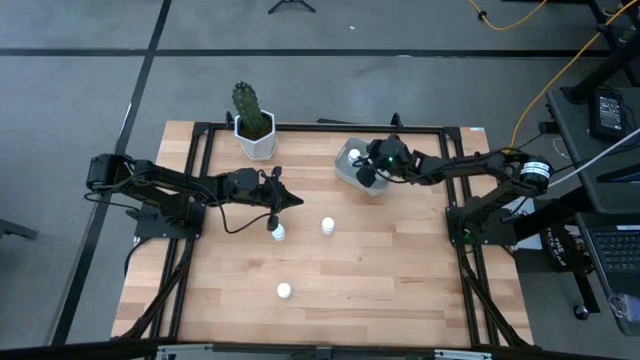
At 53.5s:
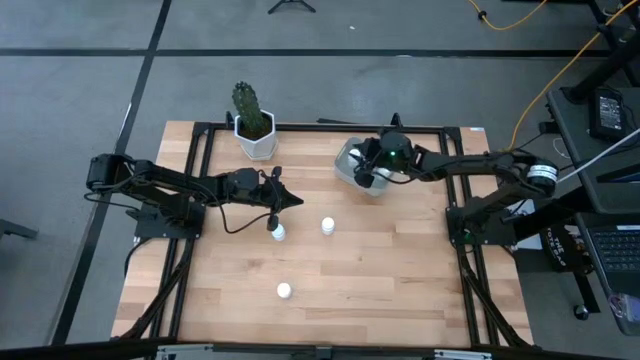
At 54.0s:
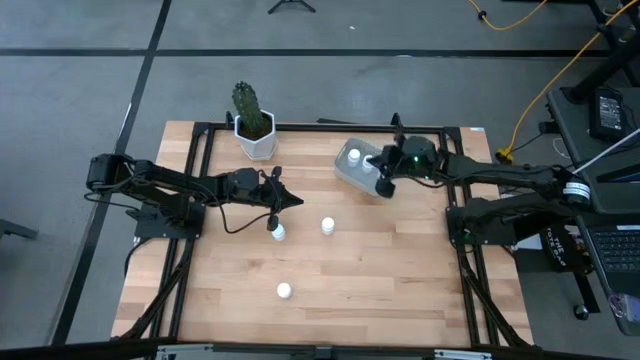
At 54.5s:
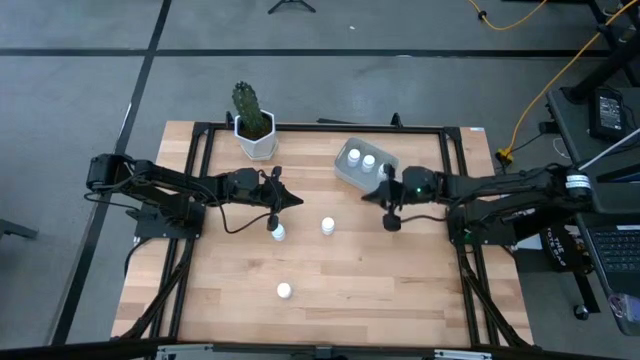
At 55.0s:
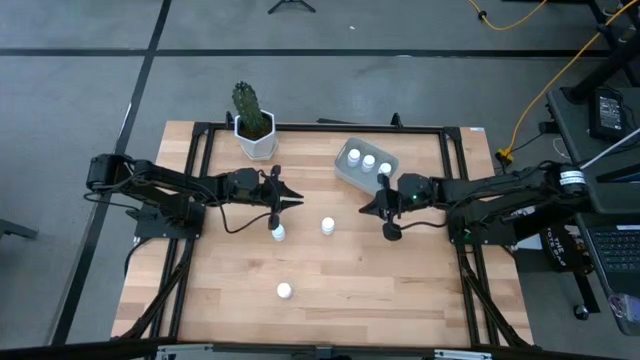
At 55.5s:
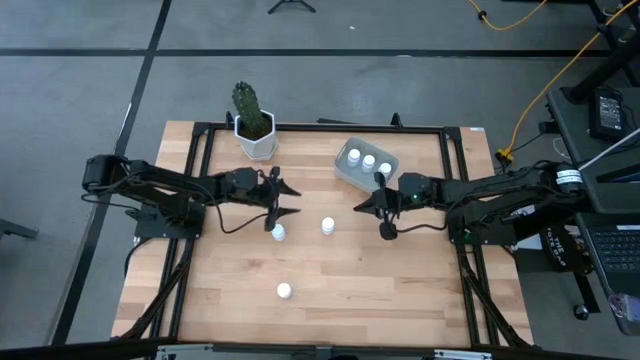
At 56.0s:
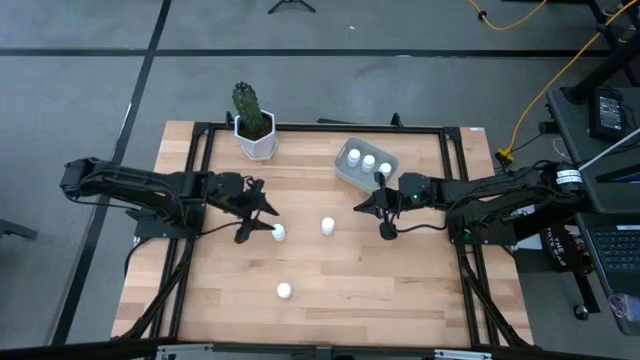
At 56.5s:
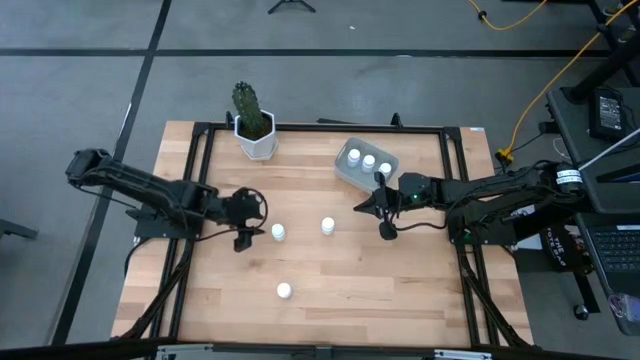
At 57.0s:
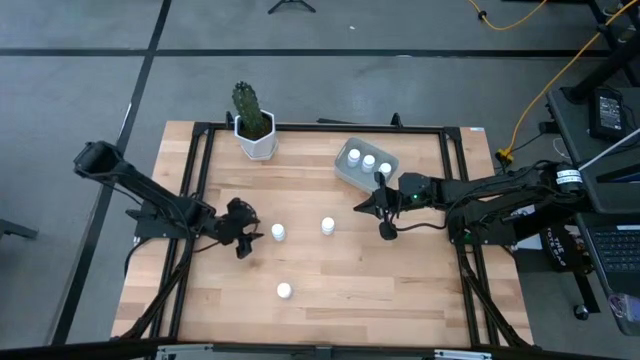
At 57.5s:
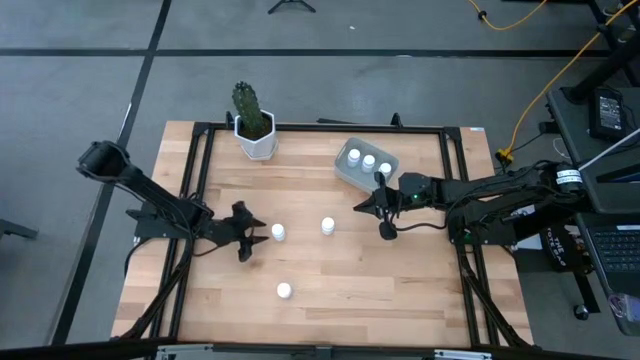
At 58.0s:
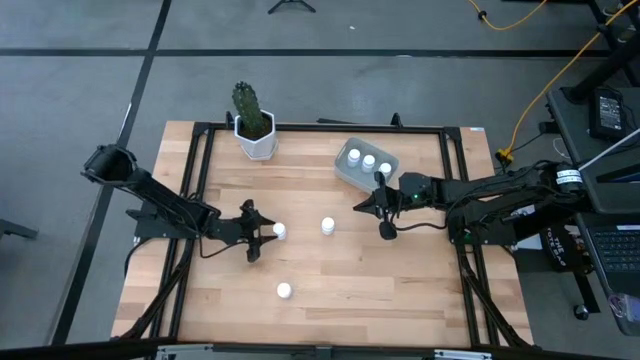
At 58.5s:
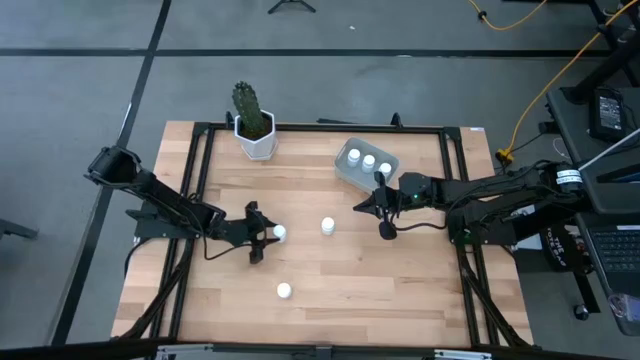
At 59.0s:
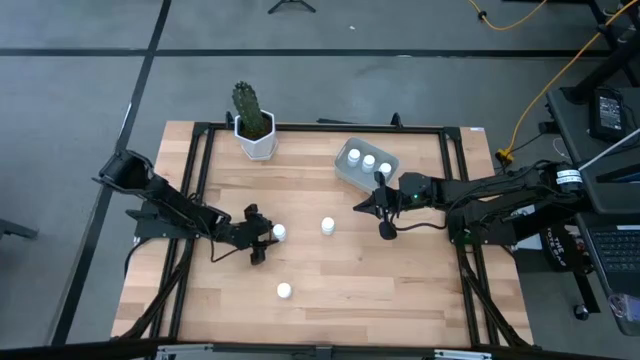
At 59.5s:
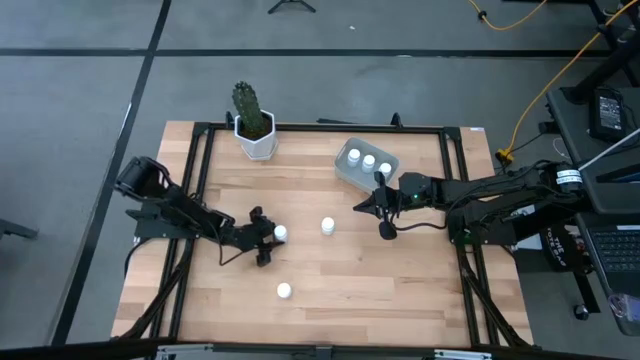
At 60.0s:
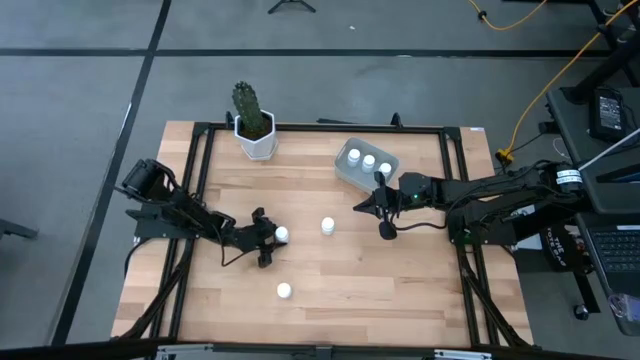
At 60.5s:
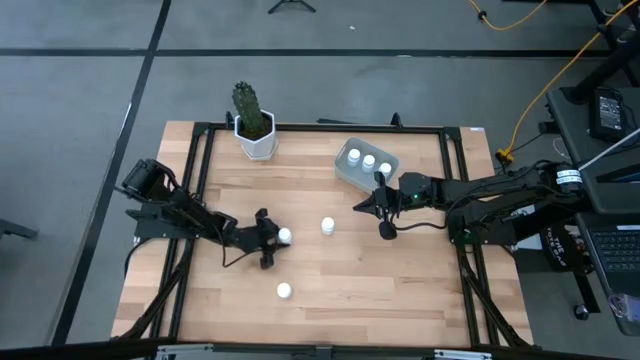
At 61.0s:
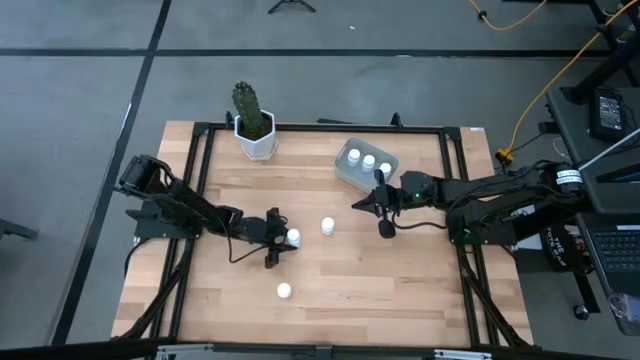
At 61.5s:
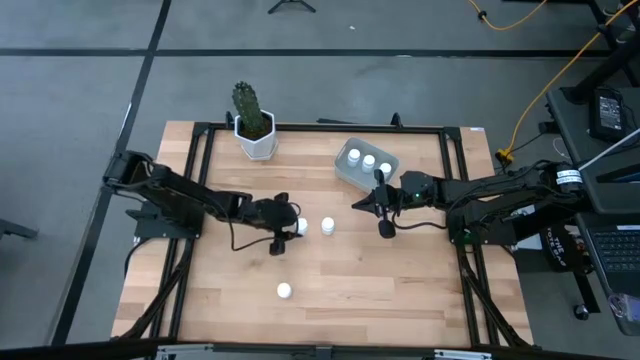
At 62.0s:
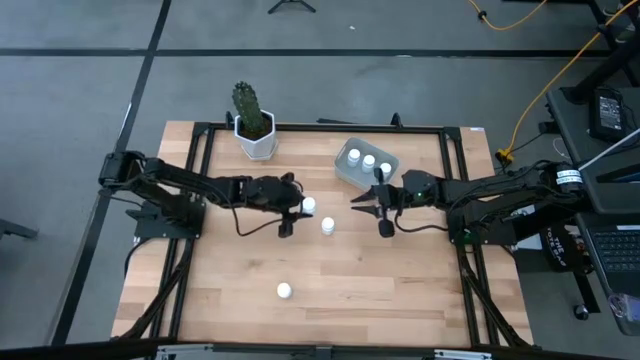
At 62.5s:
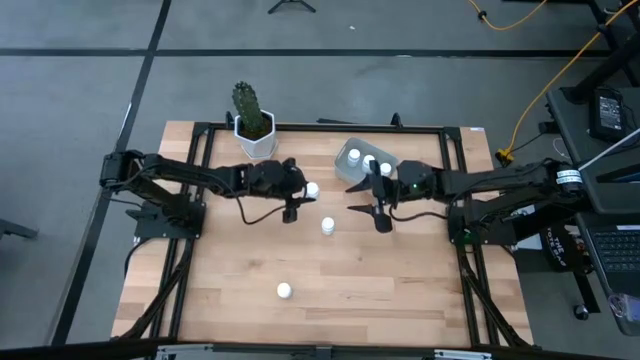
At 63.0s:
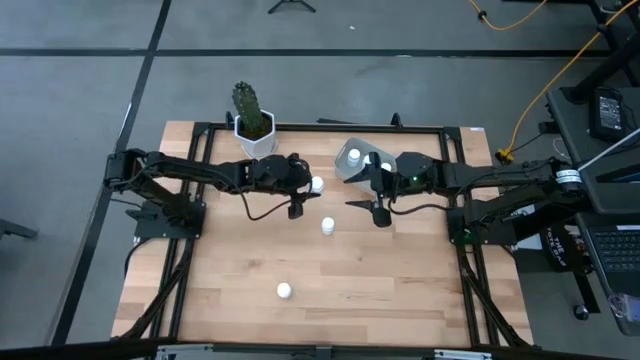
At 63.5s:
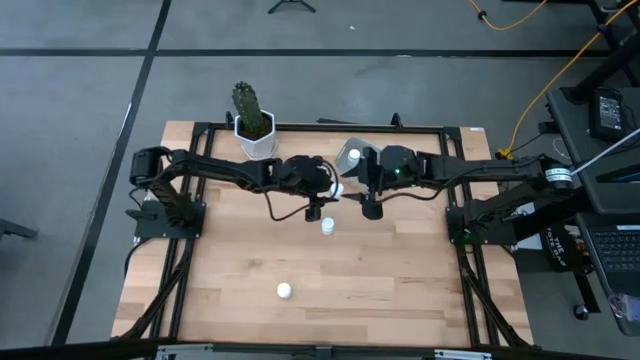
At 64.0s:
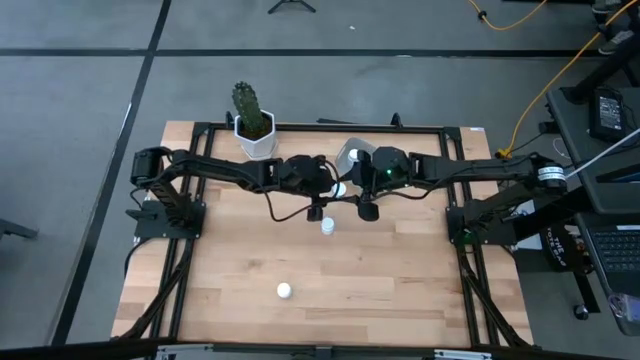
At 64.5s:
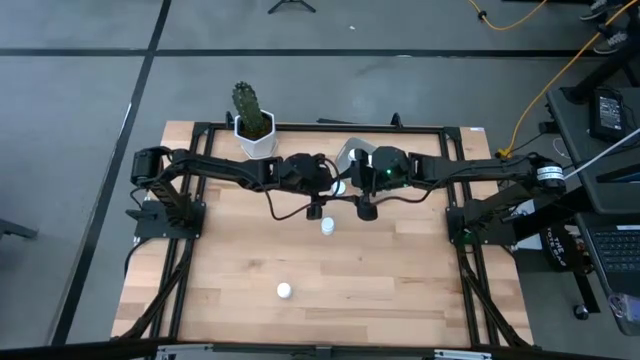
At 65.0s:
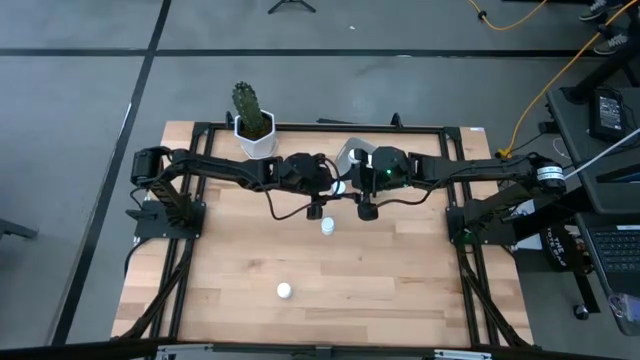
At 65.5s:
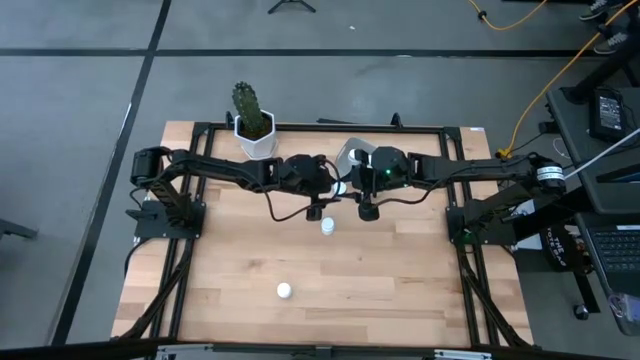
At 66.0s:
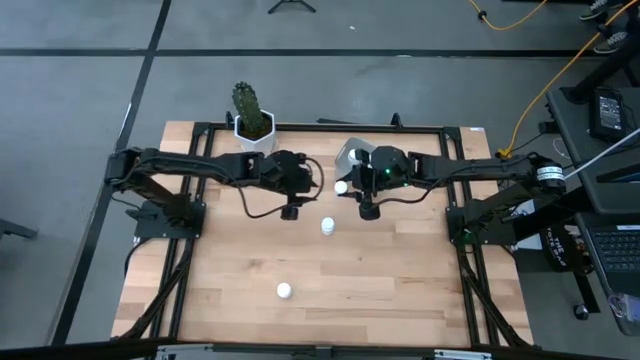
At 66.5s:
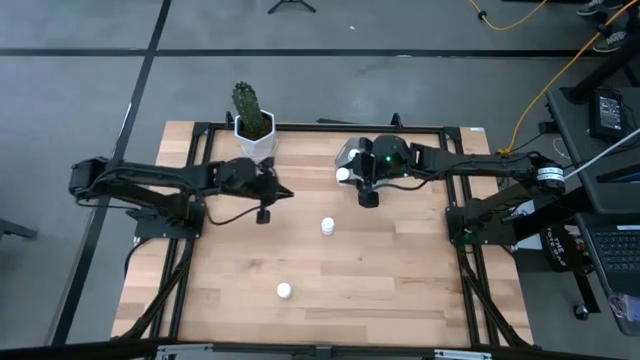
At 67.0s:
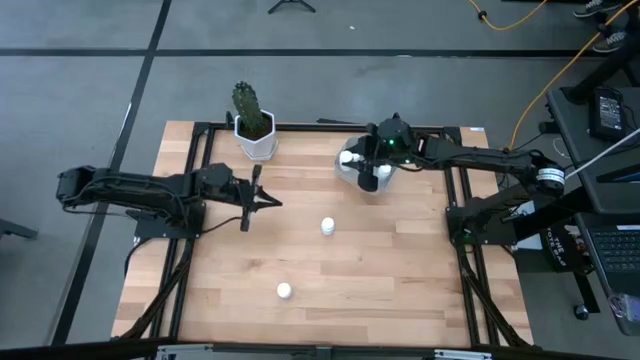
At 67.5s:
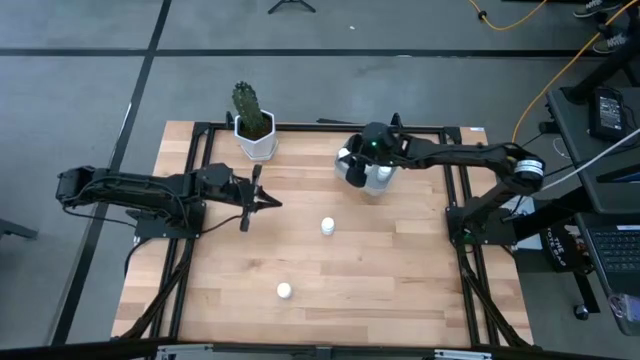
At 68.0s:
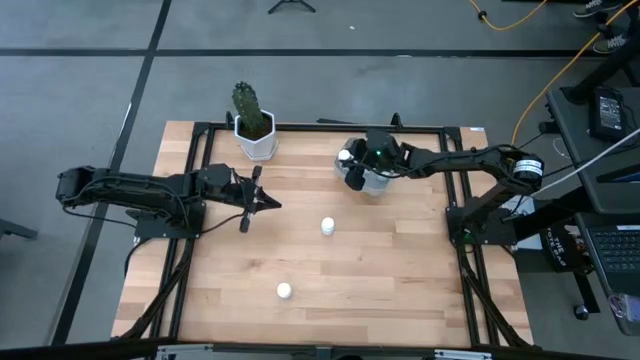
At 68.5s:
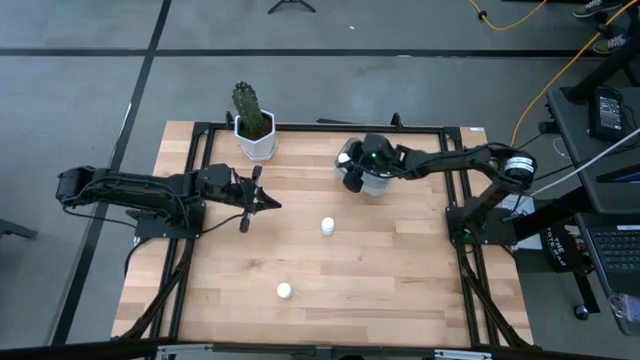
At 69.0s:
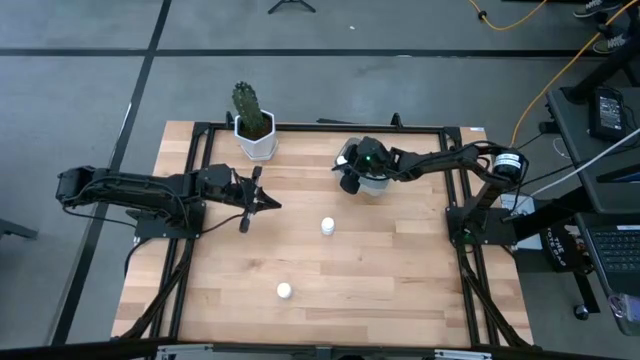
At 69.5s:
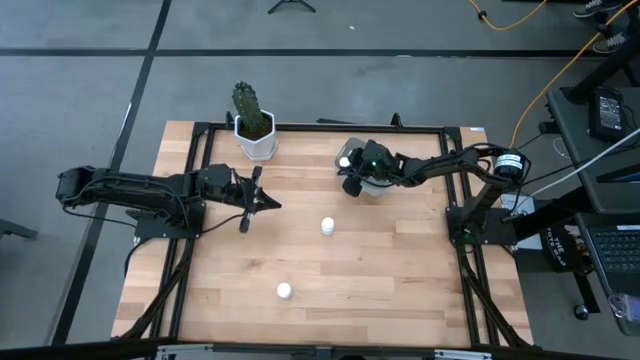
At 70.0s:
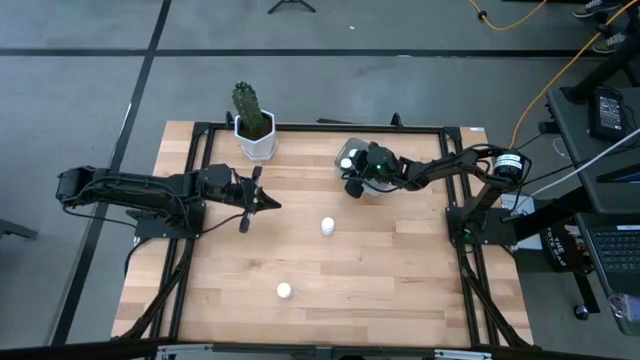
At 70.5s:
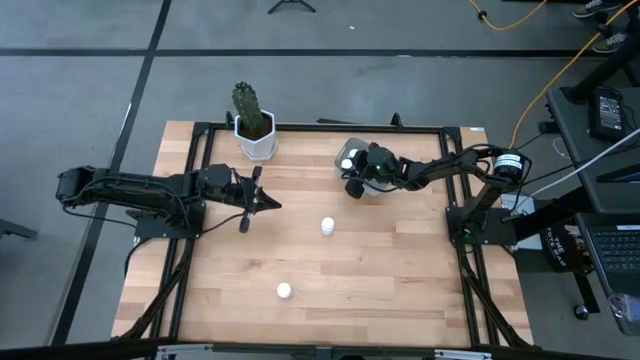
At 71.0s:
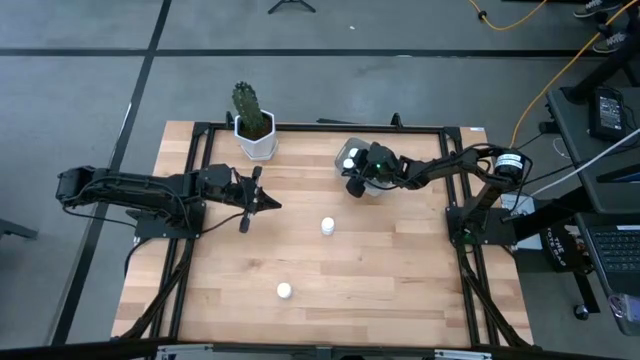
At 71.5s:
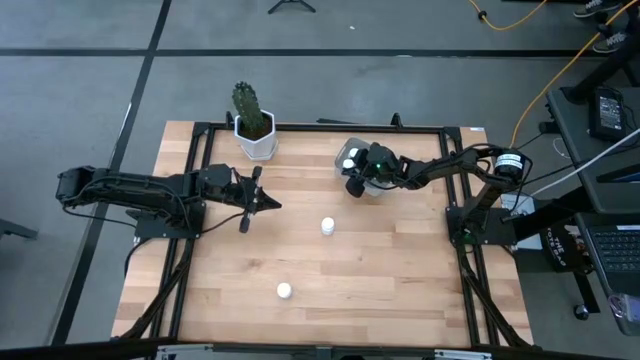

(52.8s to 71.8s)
Task: Pick and place pill bottles into a basket
Put the white pill bottle into the gray bin

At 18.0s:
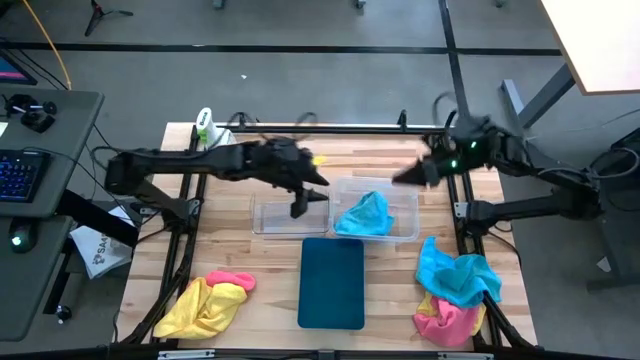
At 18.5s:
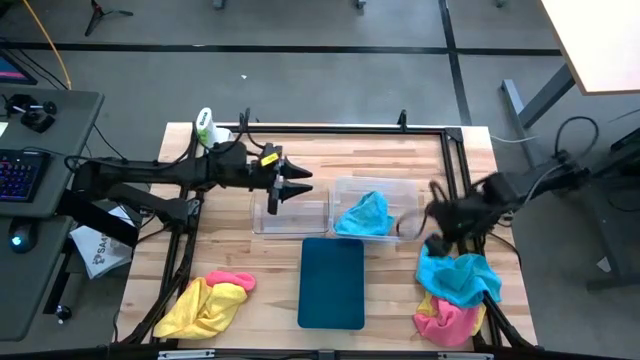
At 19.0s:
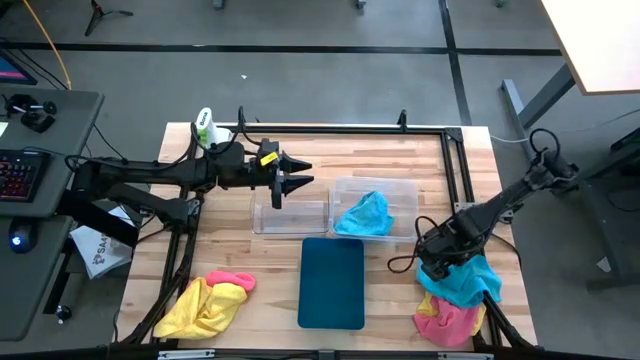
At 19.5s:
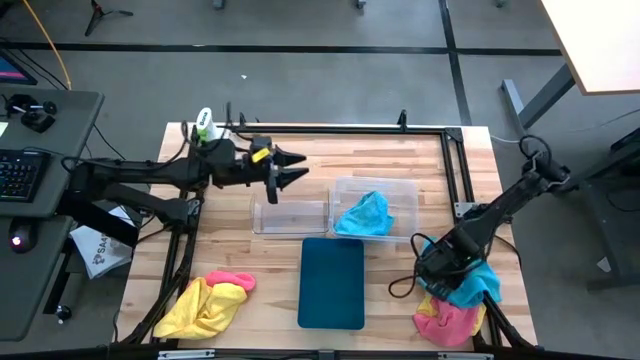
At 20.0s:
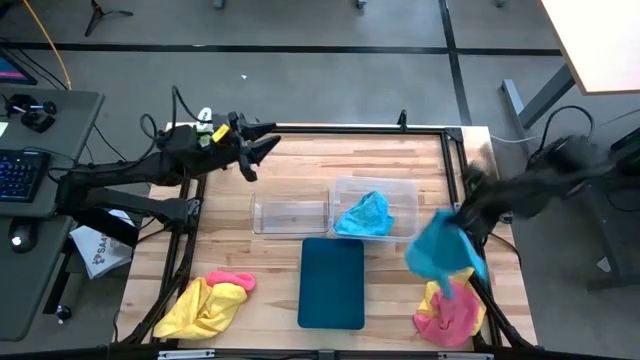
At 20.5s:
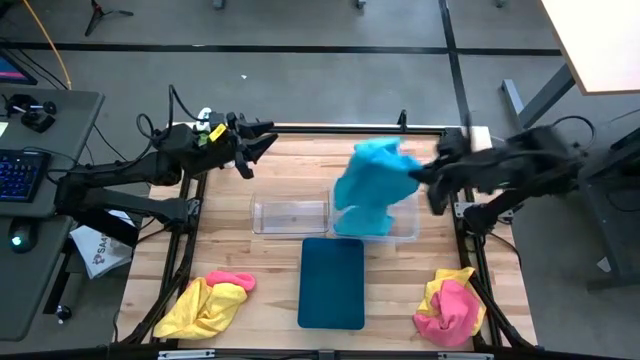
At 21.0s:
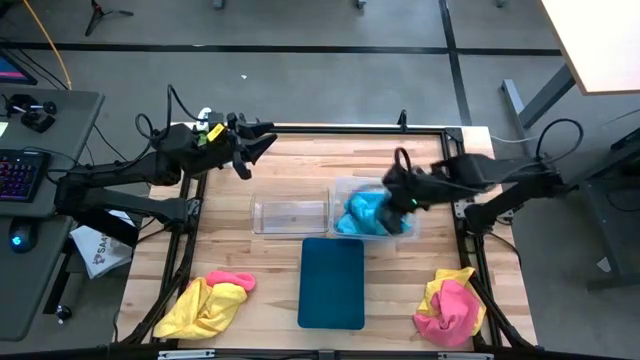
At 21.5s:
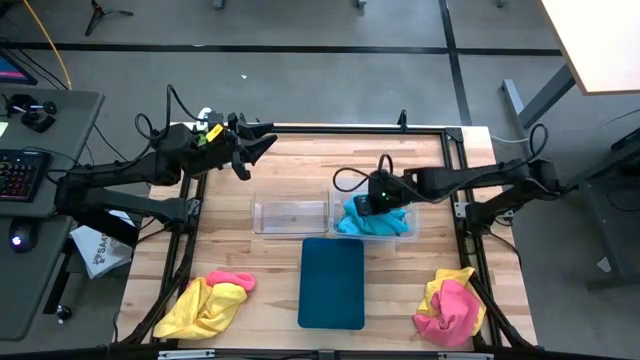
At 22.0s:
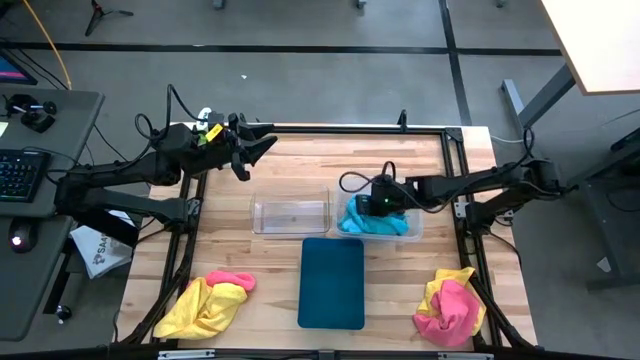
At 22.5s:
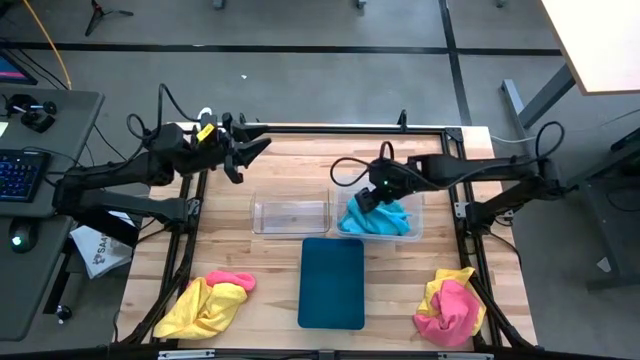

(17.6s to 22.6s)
Task: Sort microfiber towel by color & place in baskets
Put the blue microfiber towel into the white bin
